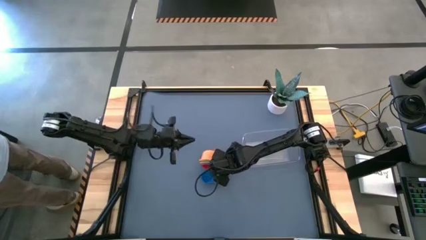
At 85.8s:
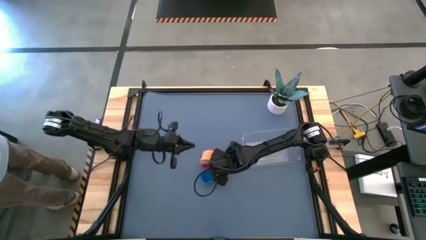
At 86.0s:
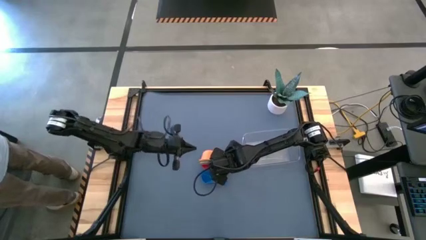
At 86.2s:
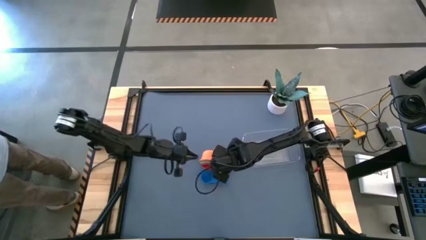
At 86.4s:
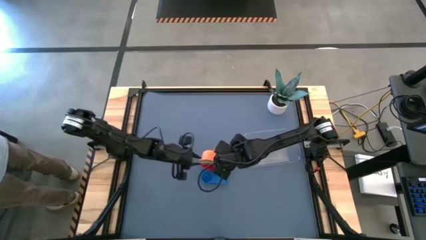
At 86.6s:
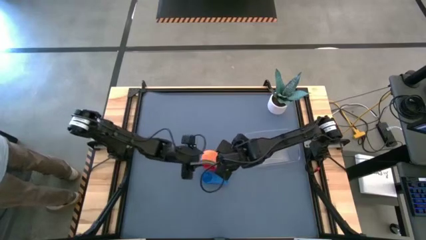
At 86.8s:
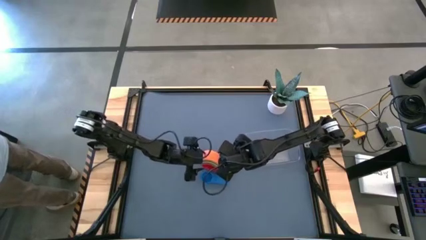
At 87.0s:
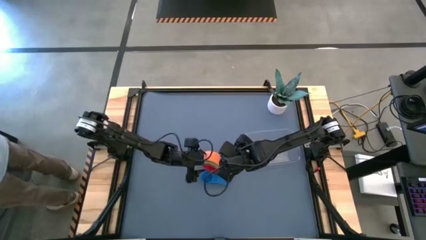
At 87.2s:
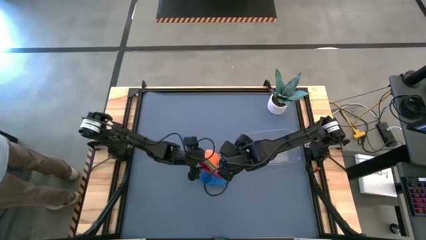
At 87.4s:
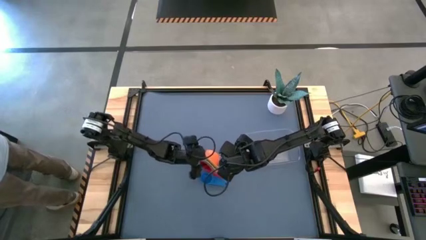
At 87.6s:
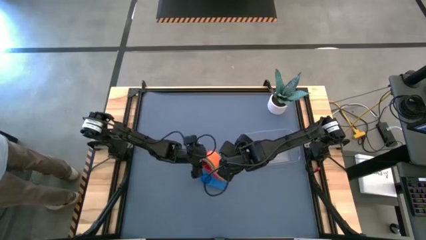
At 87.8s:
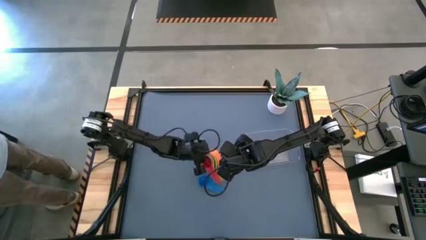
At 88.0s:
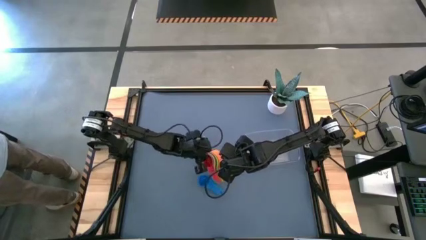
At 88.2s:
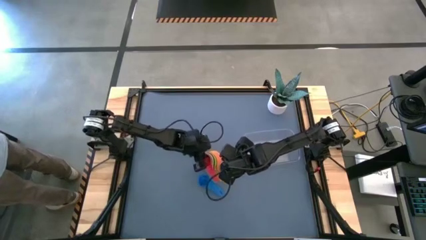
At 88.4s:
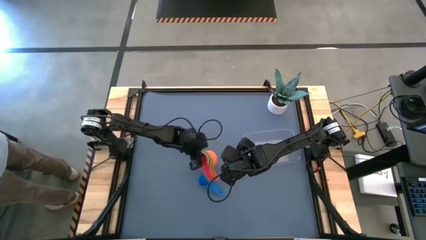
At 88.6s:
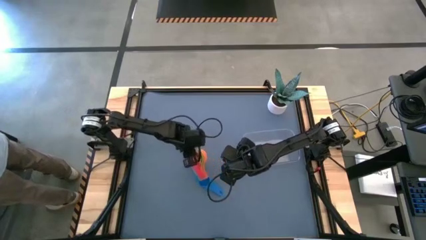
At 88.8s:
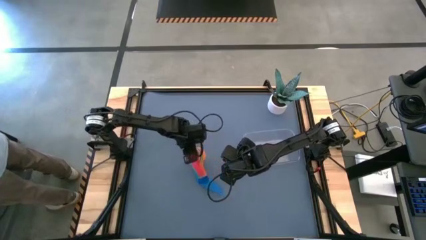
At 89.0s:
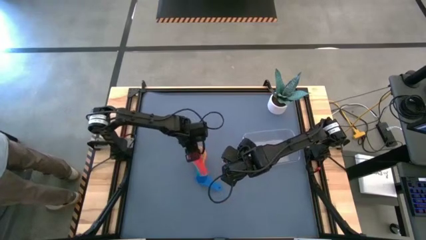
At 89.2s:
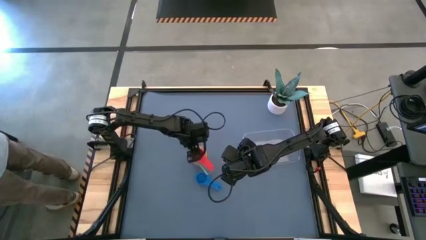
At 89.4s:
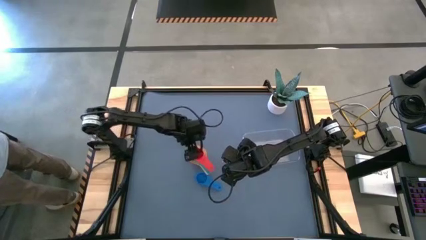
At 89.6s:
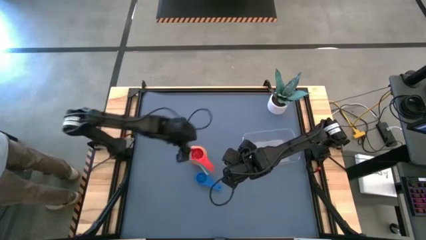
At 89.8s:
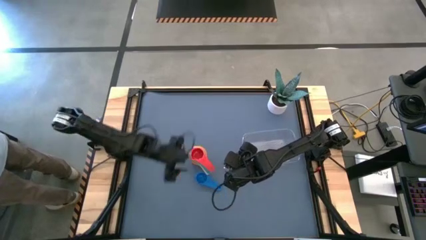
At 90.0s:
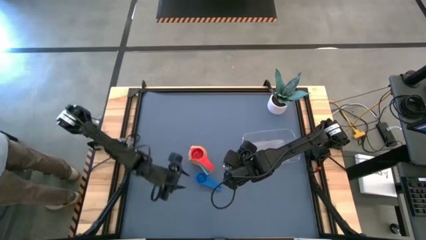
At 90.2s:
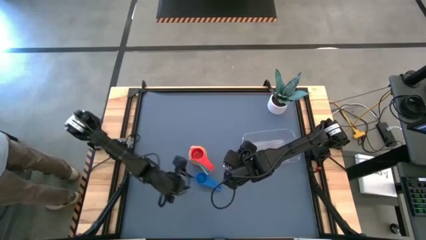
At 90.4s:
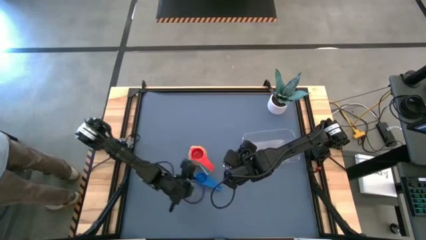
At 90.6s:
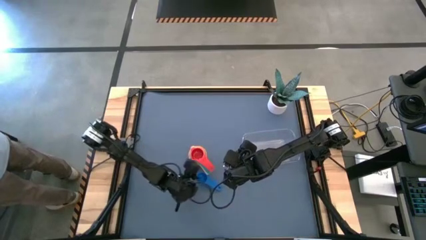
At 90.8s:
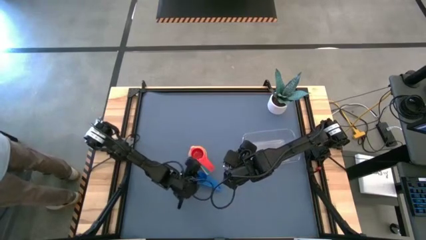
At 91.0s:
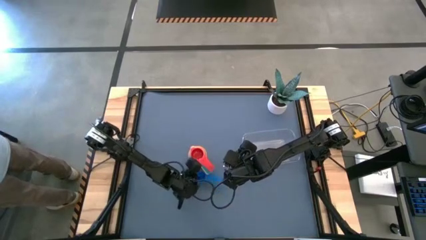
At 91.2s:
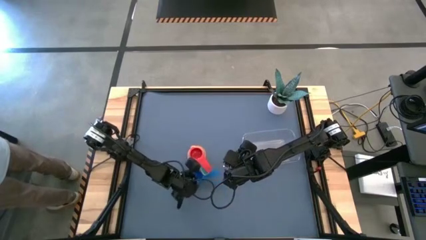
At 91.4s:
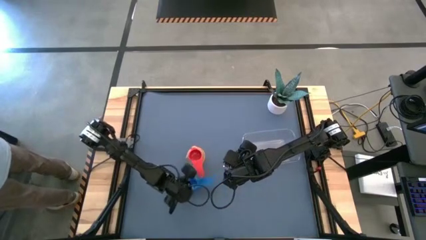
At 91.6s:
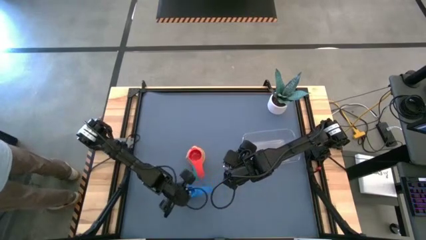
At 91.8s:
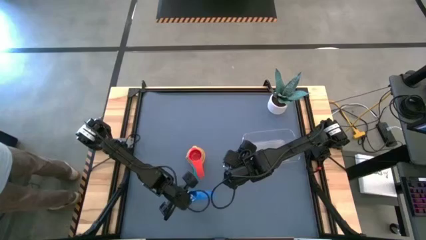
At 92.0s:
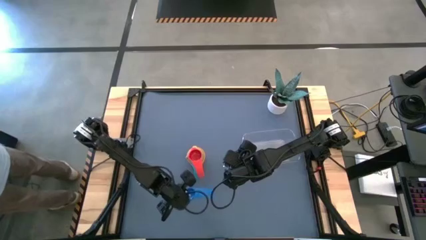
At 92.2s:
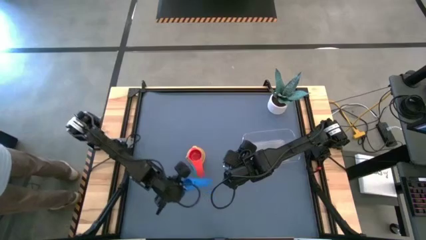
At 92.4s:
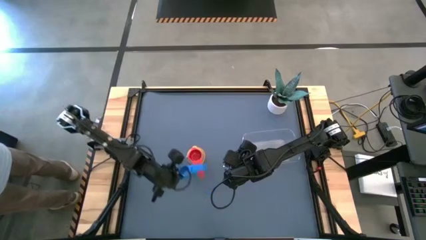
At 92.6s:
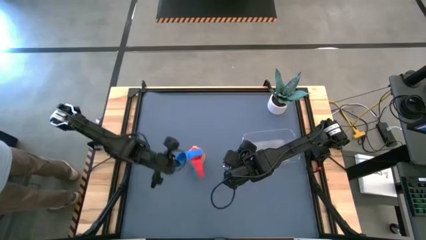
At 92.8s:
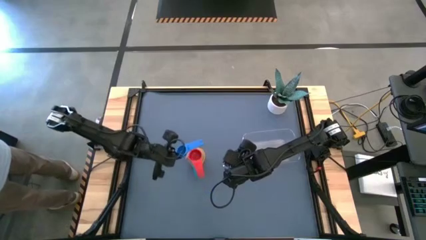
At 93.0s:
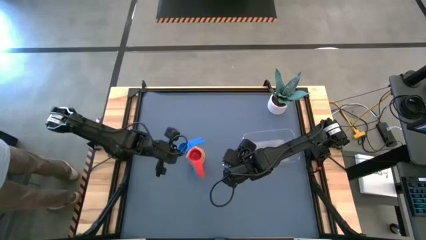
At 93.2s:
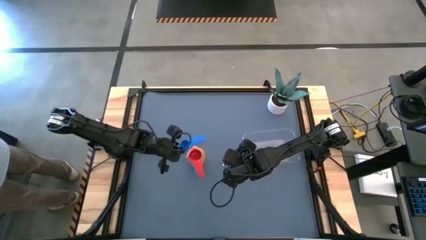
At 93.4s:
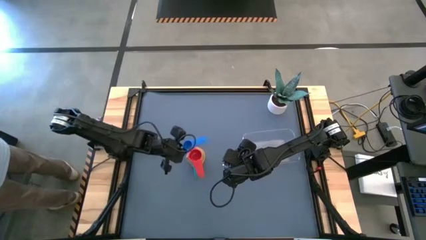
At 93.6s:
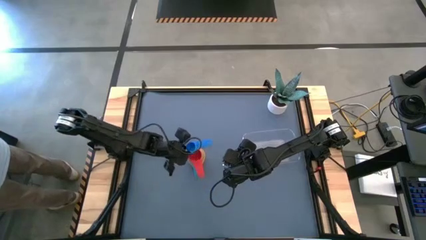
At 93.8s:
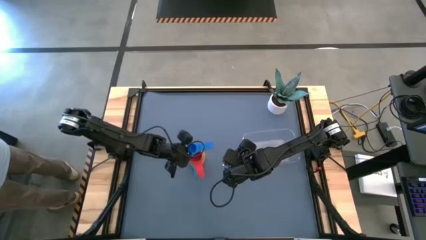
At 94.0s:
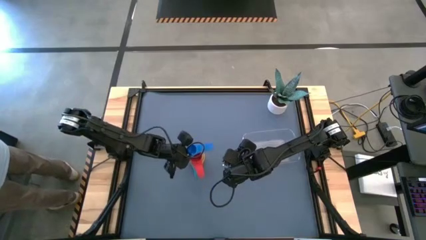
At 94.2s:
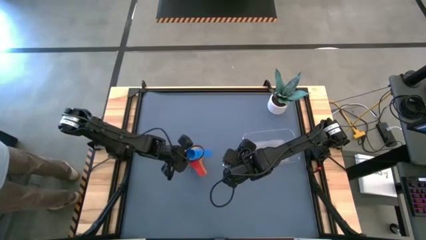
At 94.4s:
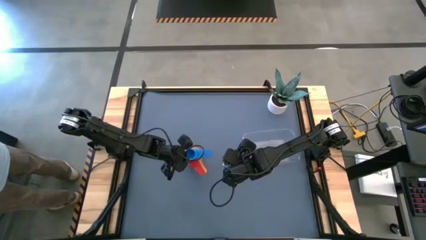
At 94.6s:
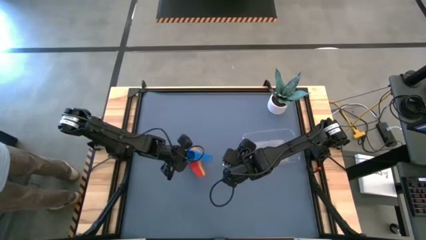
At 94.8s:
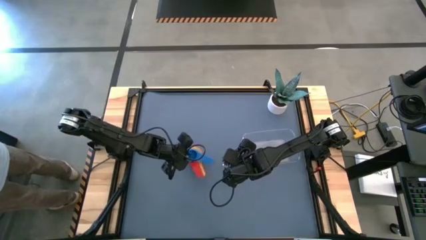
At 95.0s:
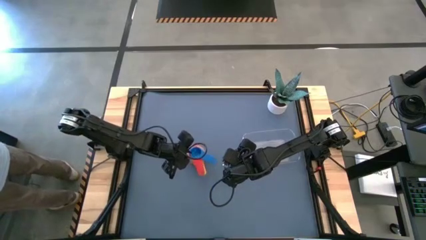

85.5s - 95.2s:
Task: Nest measuring cups in basket
Stack the blue measuring cup on top of the red measuring cup

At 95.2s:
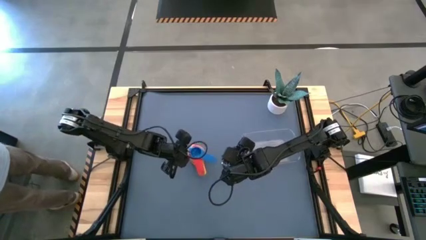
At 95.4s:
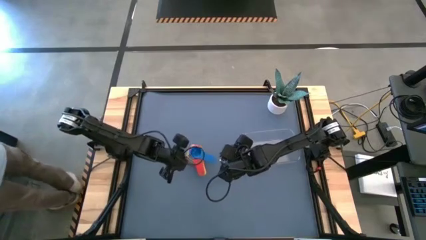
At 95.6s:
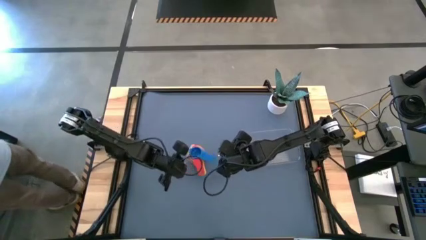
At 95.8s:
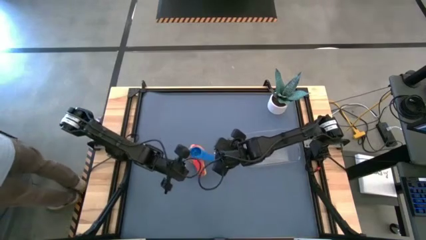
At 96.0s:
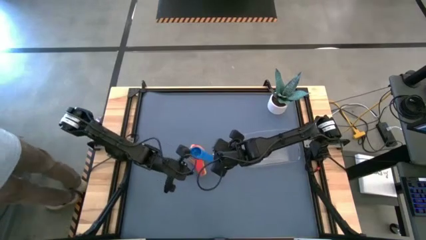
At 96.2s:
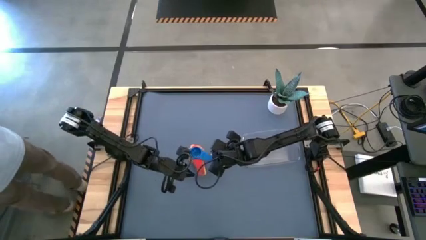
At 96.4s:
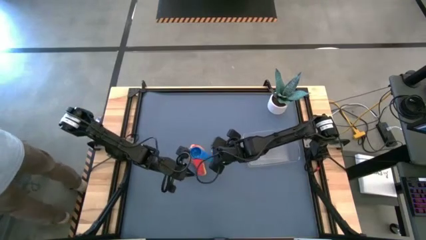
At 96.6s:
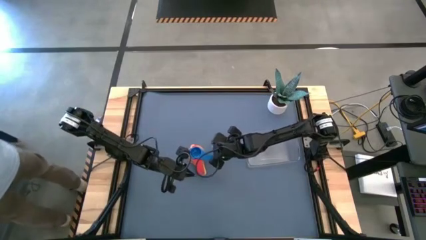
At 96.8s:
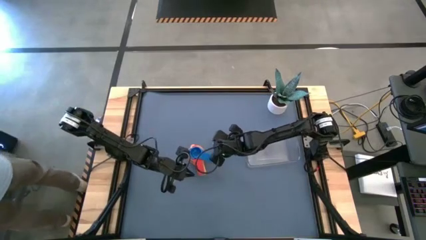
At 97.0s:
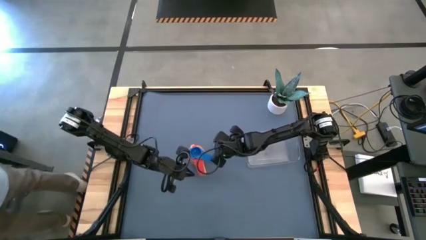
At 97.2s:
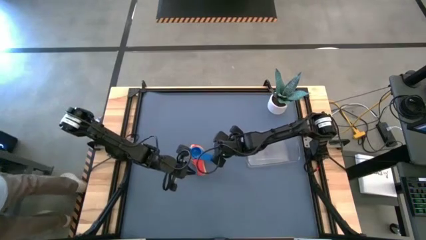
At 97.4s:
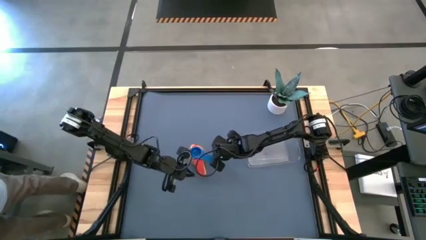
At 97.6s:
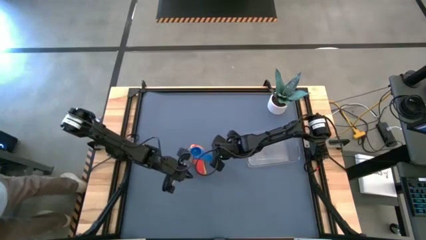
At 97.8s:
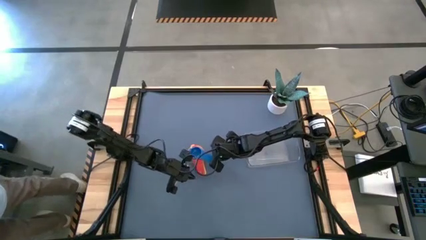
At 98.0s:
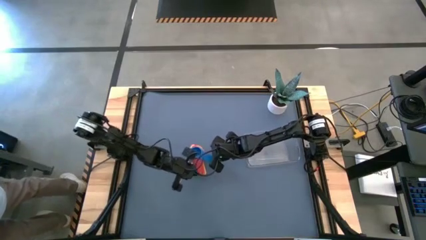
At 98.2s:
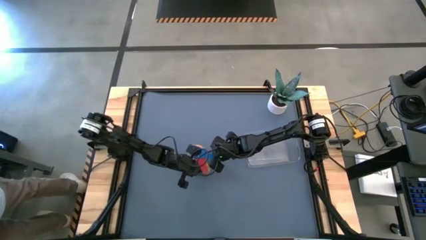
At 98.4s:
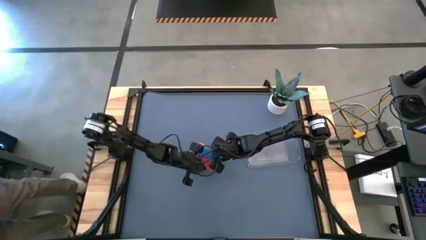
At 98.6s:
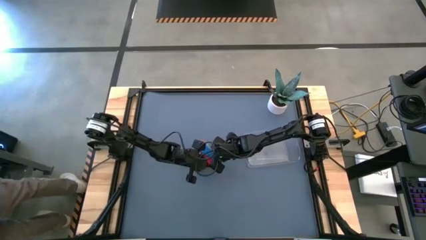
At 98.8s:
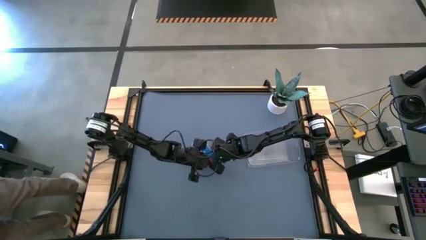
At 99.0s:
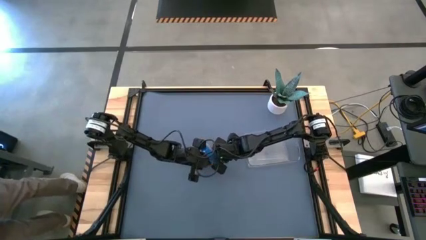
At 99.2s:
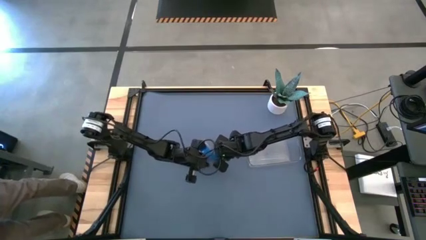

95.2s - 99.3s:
Put the stacked colored measuring cups into the transparent bin

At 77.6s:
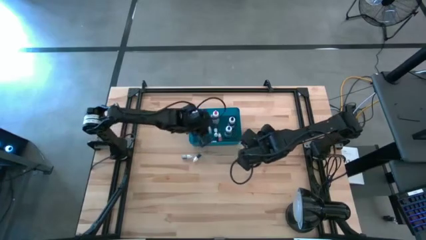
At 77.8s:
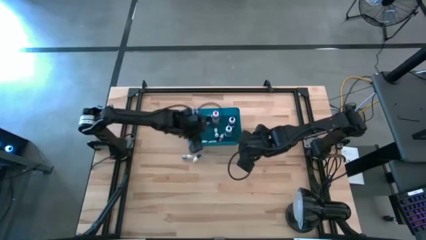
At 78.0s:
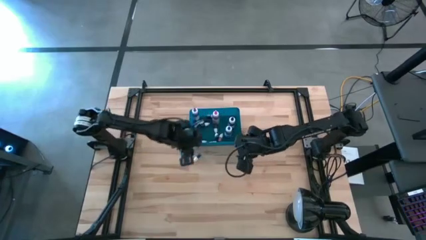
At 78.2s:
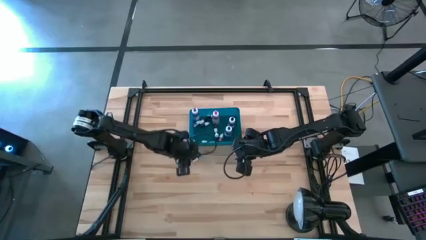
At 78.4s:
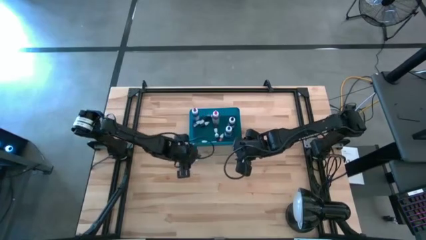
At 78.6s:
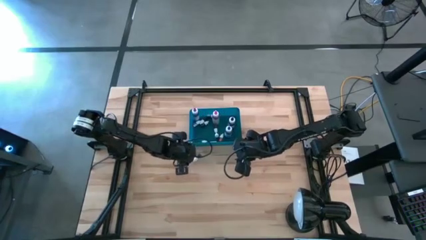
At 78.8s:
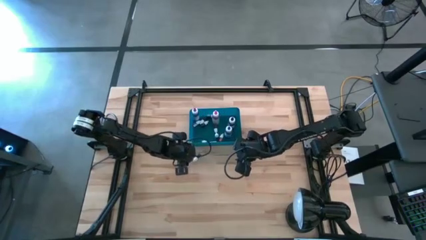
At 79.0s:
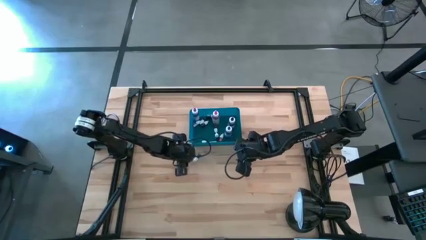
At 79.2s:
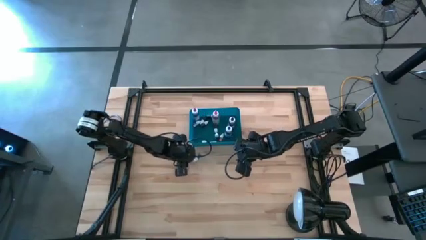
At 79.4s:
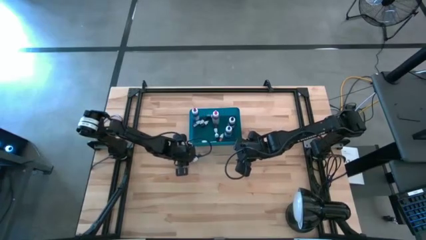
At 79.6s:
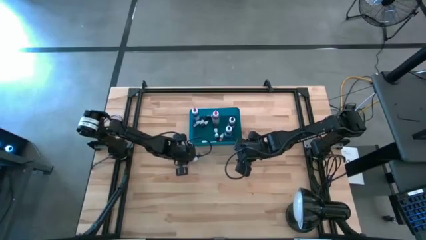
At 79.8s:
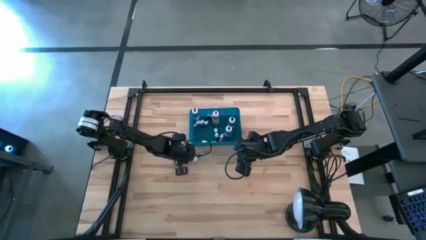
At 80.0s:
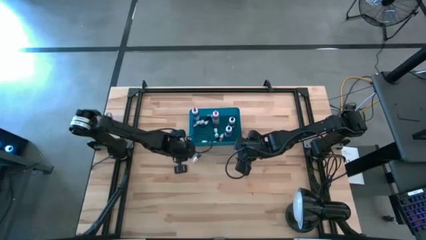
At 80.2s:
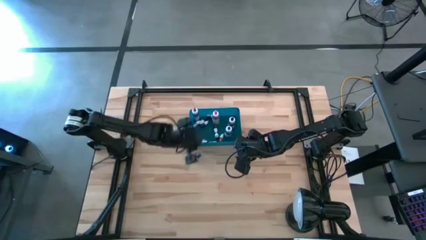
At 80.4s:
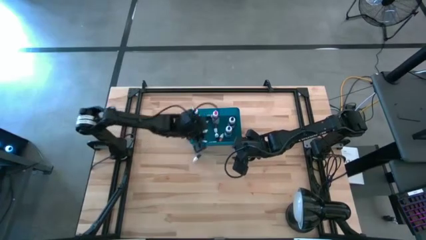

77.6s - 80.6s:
Task: Pick & Place food coloring
Put the small green food coloring bottle into the bin
